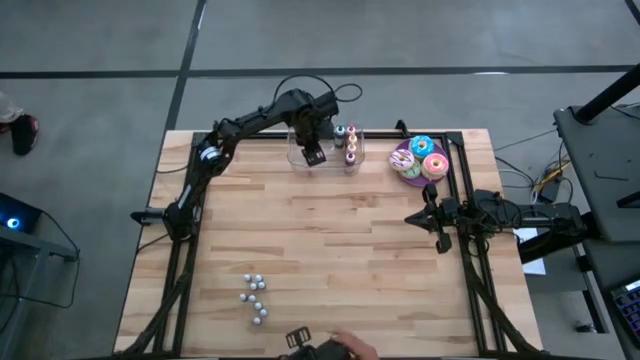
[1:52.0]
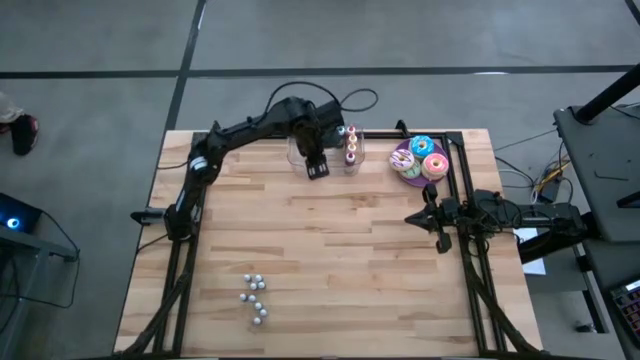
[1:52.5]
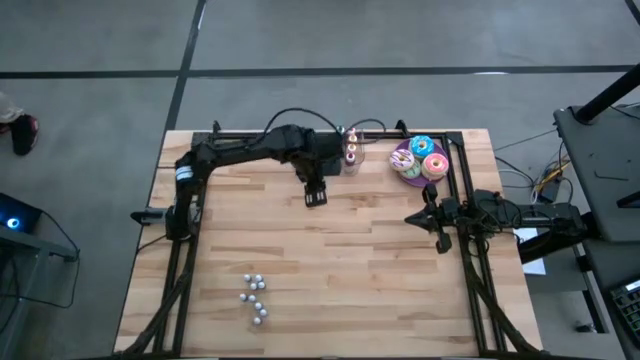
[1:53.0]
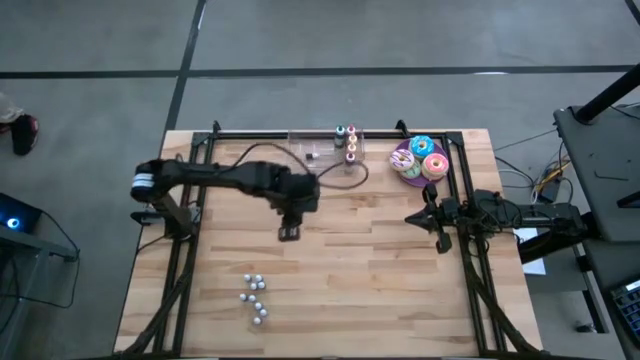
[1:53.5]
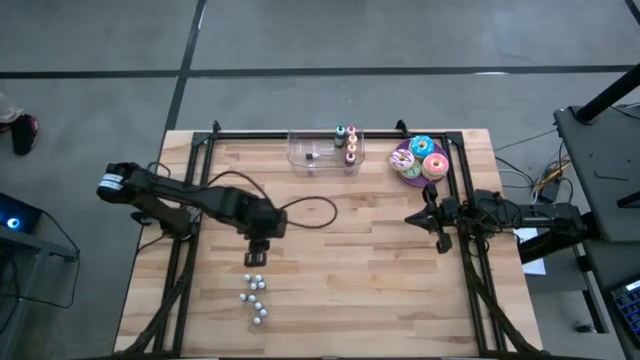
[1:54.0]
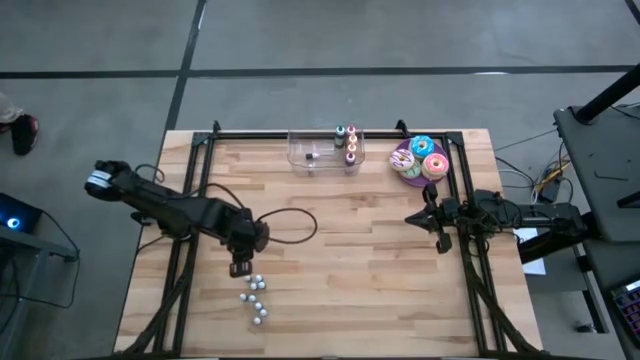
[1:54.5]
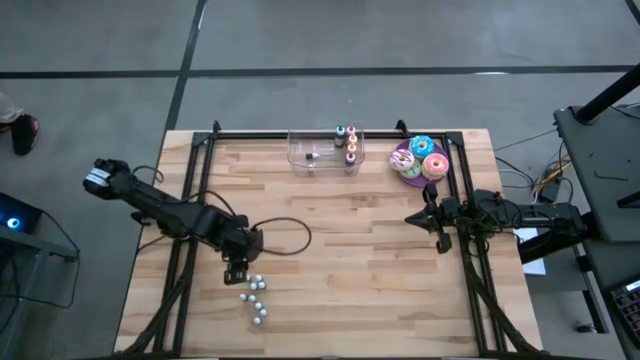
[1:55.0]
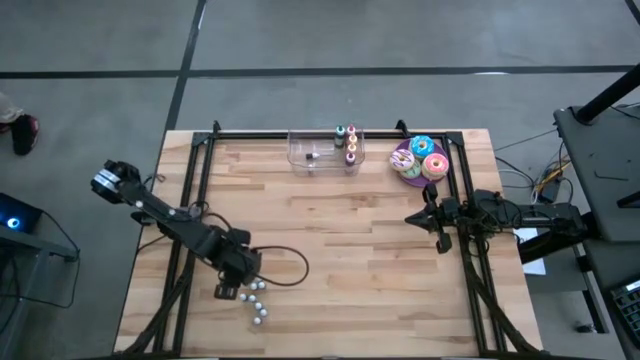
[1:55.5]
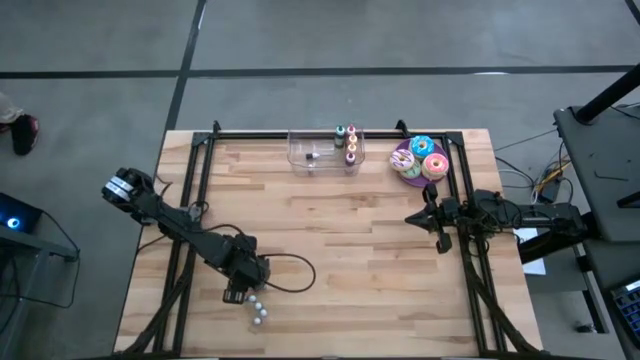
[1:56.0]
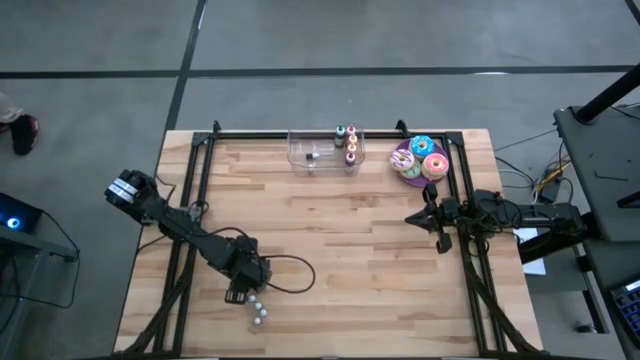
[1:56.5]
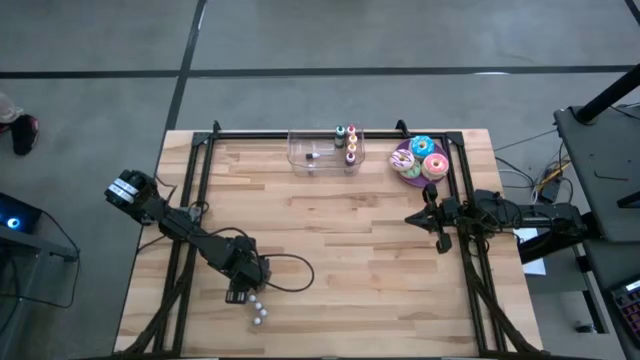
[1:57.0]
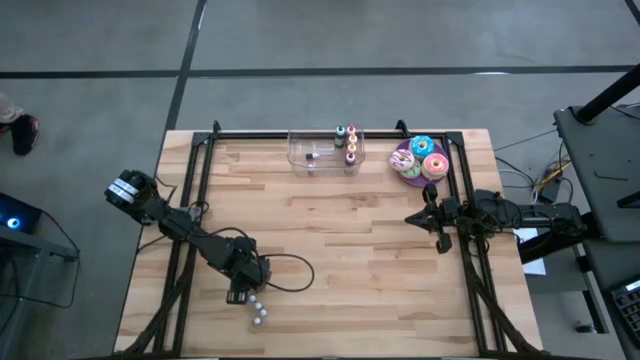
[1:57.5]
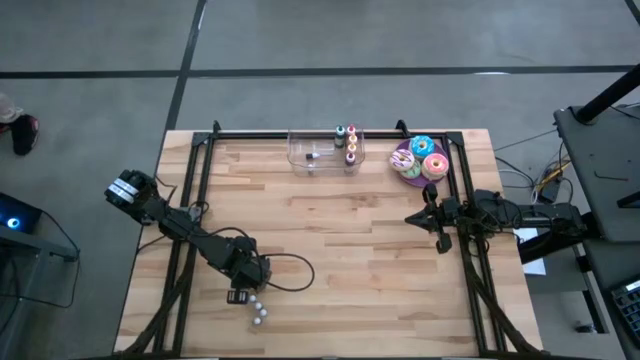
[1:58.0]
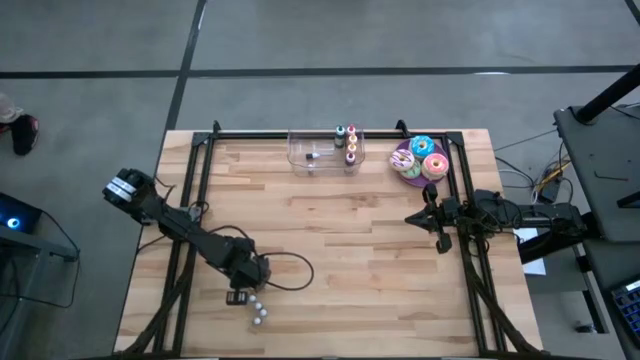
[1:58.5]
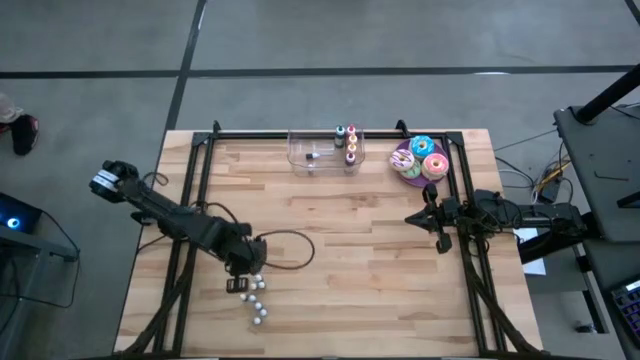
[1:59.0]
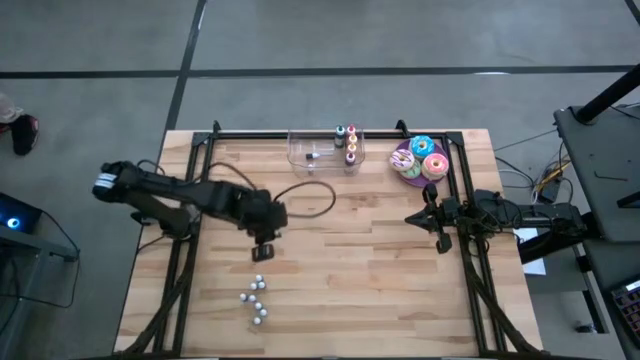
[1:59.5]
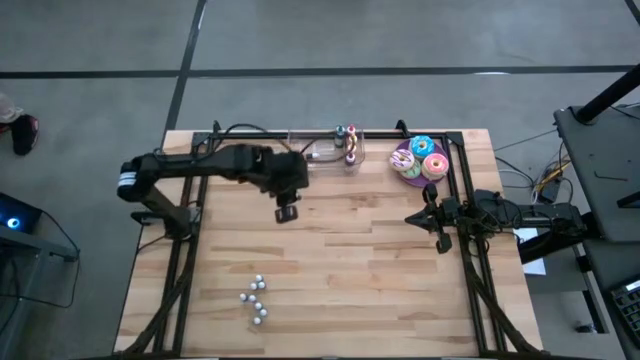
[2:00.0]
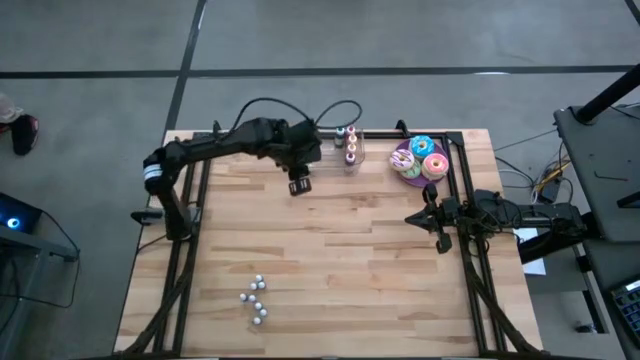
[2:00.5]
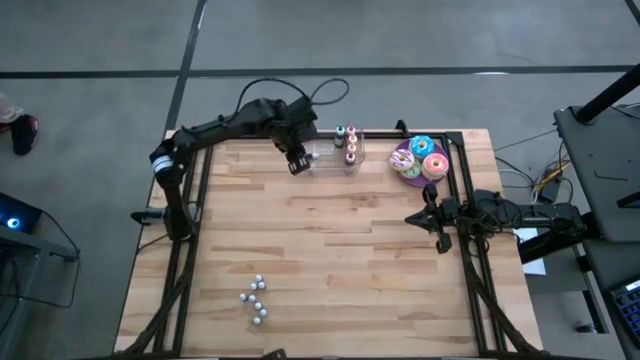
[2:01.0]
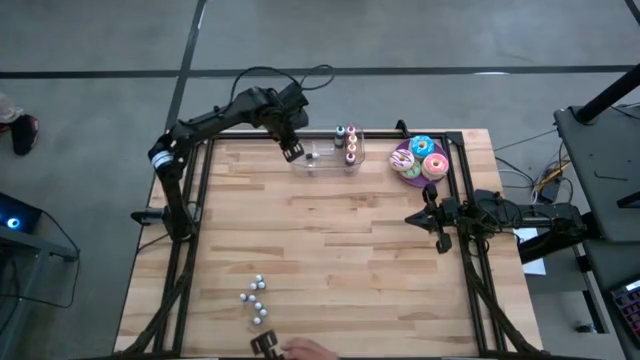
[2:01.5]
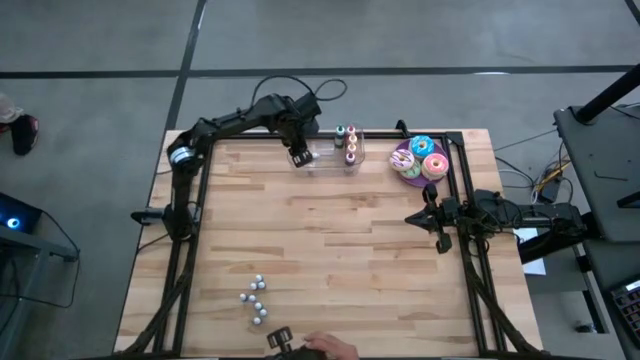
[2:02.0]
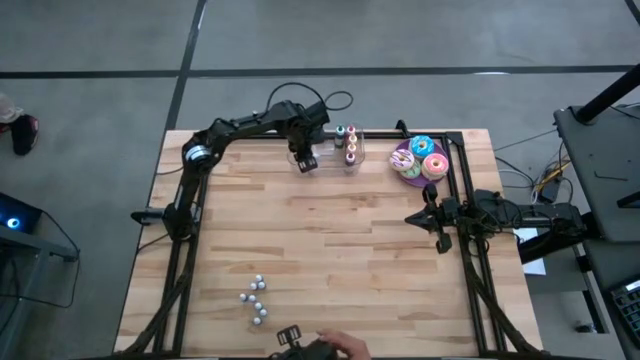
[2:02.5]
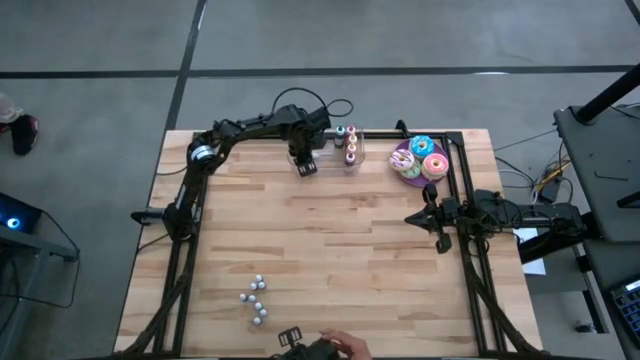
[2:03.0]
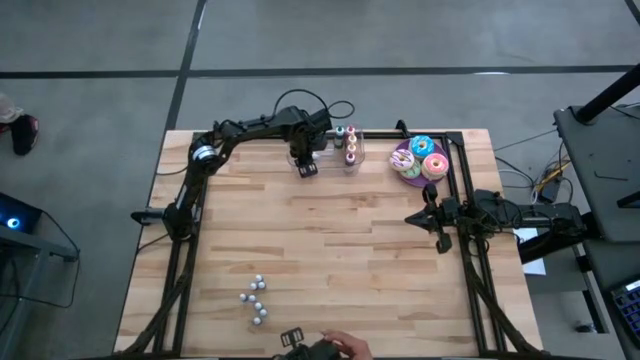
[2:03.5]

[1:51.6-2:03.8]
Task: Pick & Place food coloring
Put the top small green coloring bottle into the transparent bin

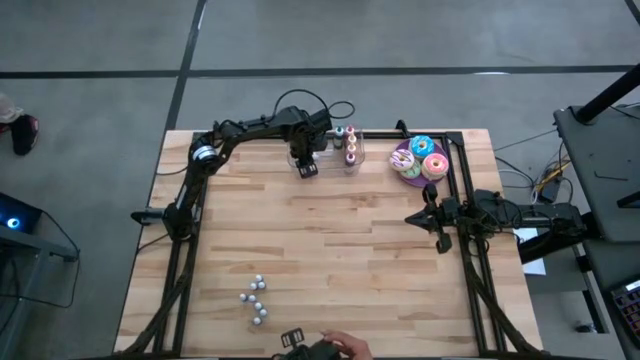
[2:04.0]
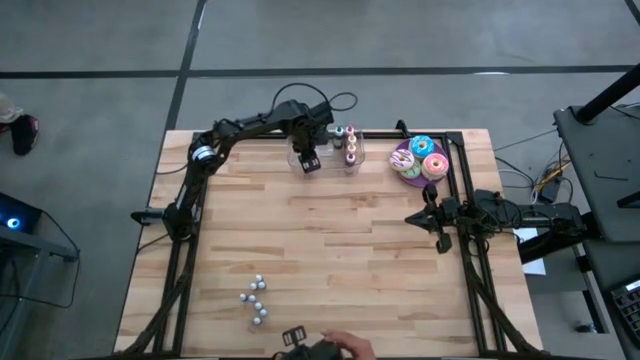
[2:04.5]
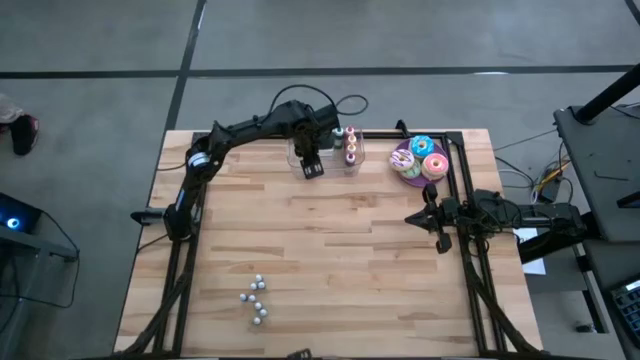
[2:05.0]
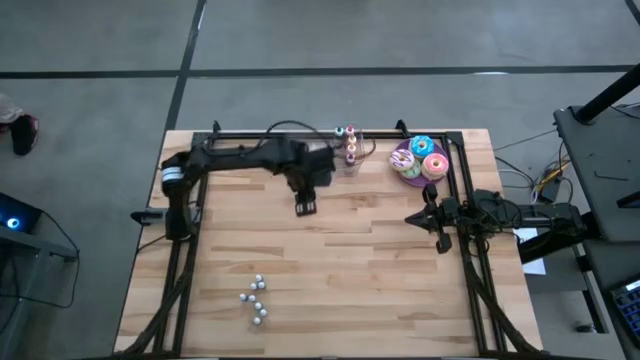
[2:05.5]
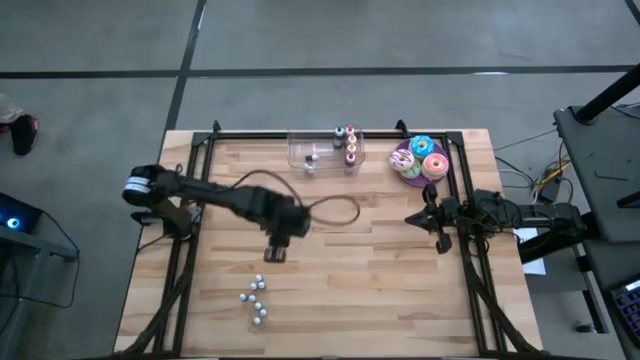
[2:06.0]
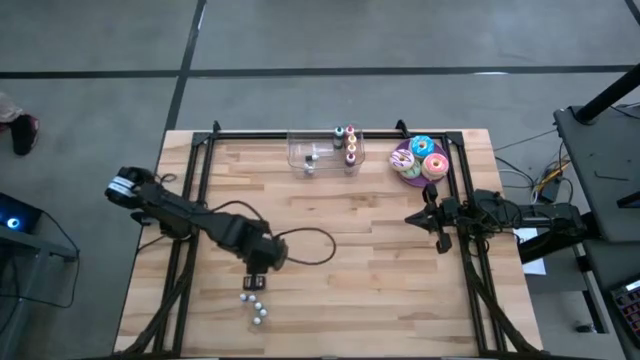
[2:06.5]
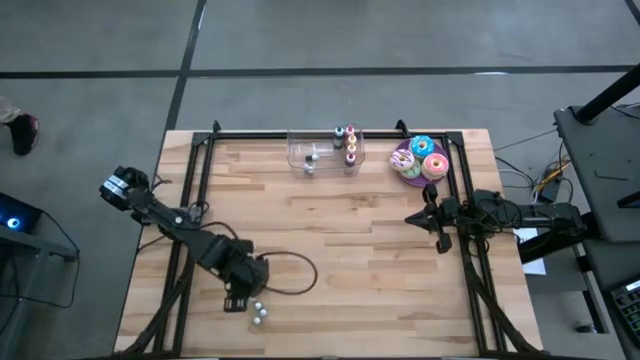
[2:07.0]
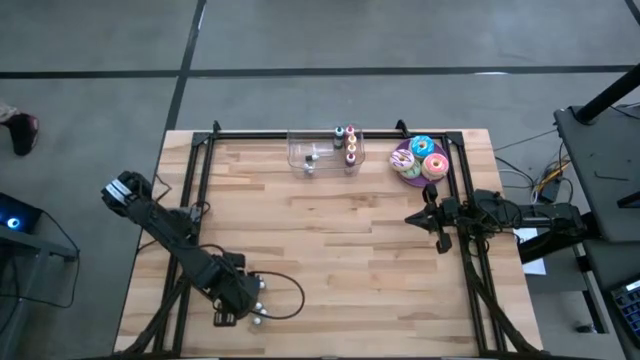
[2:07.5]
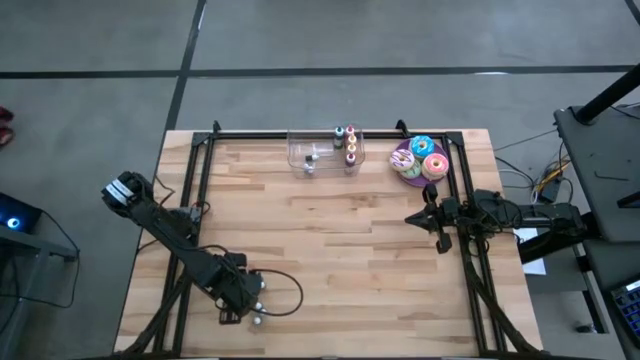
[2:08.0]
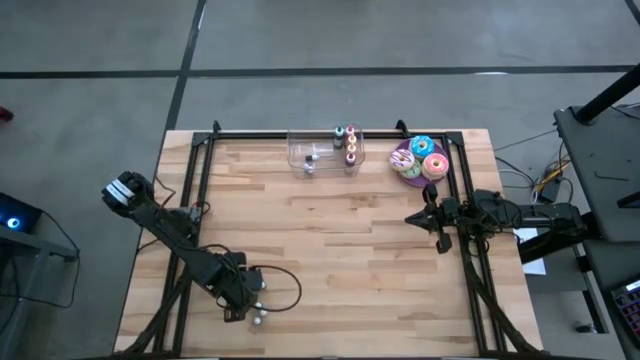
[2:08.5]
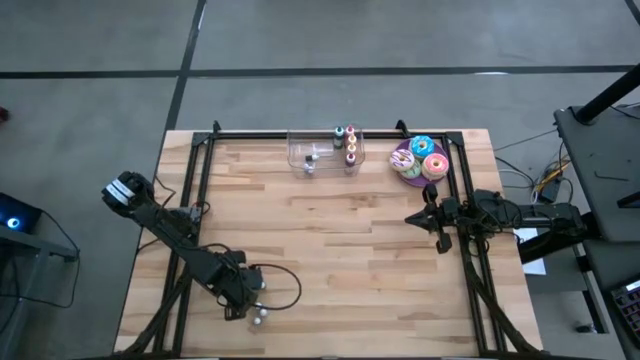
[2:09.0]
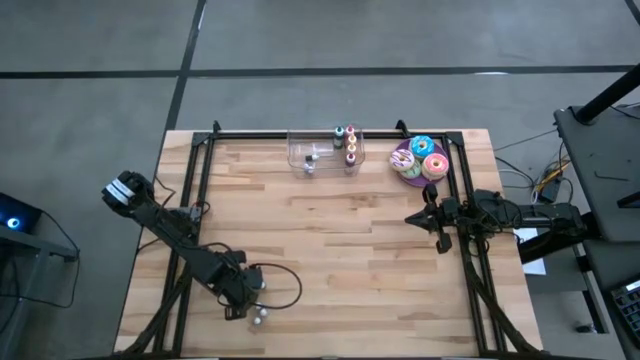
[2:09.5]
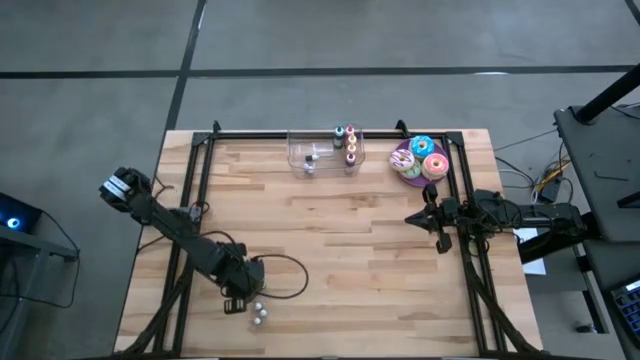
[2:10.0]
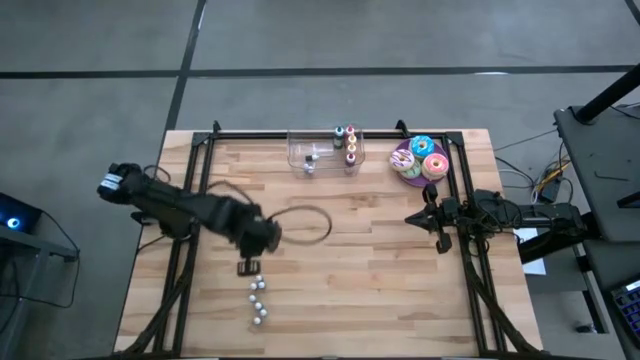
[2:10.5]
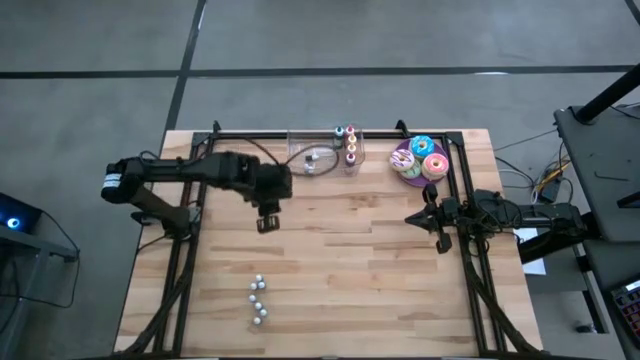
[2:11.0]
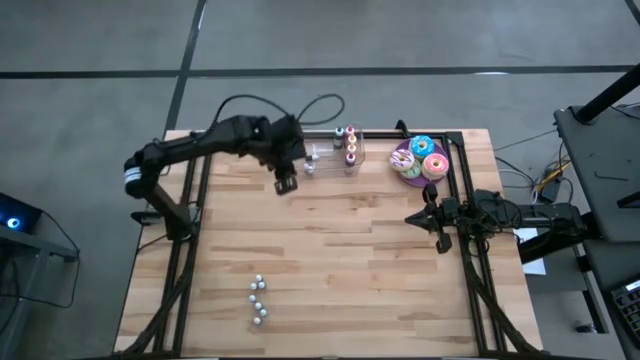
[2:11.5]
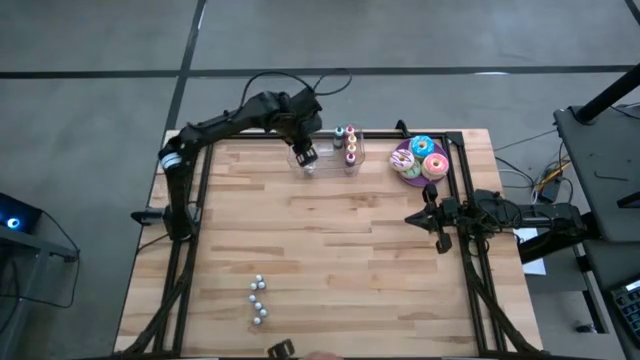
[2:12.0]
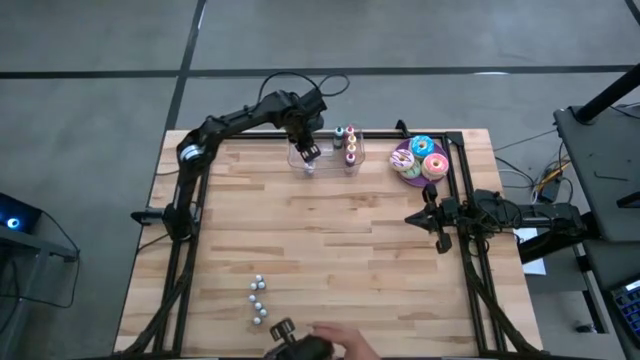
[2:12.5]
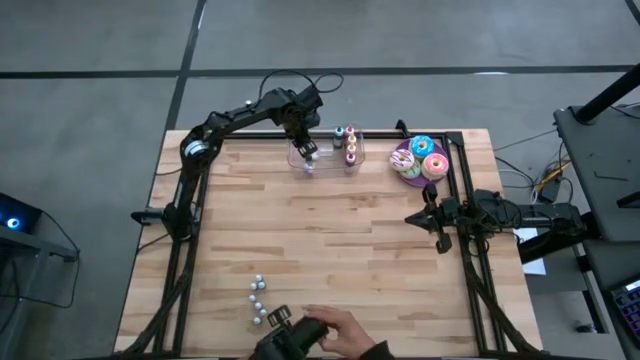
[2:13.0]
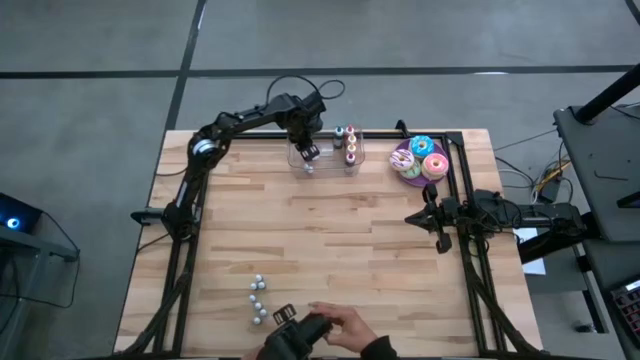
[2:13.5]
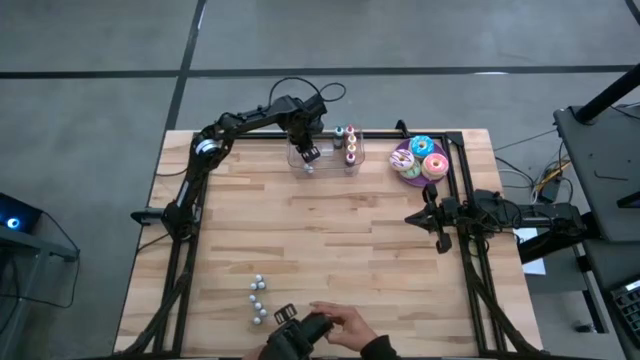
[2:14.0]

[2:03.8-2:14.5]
Put the small bottom left black food coloring bottle into the transparent bin

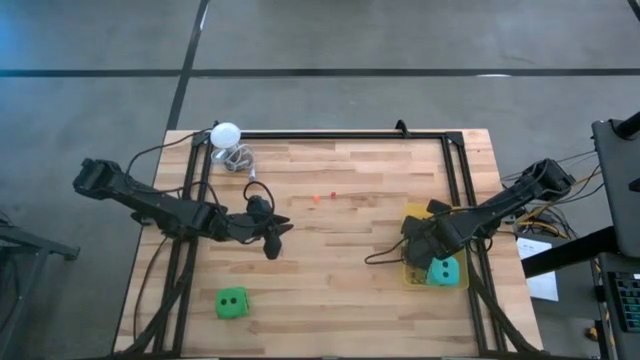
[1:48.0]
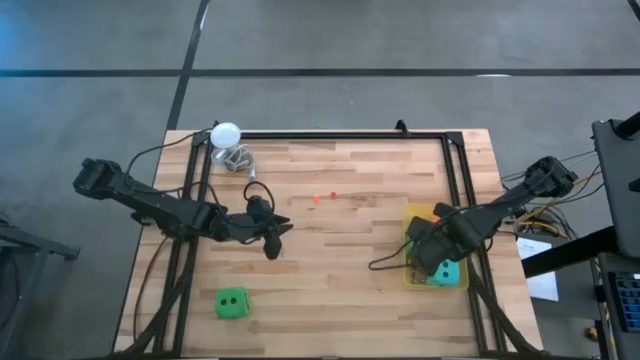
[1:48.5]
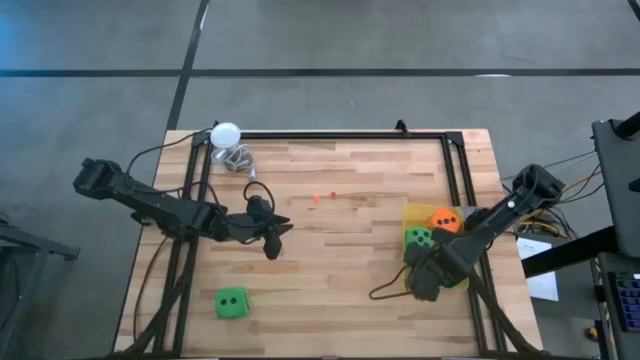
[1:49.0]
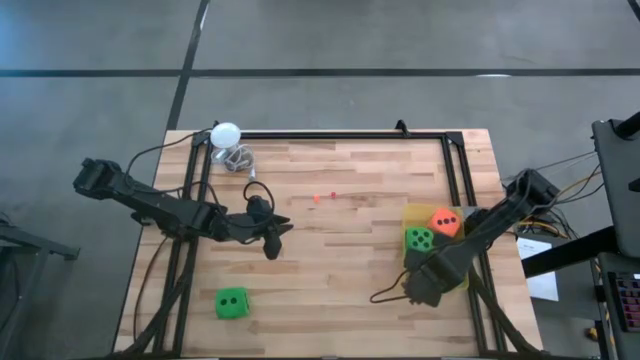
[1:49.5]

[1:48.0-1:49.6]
Task: Pick & Place Dice
Adjust the blue dice in the yellow bin
